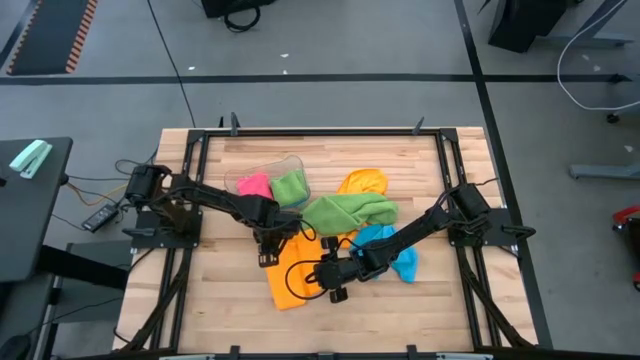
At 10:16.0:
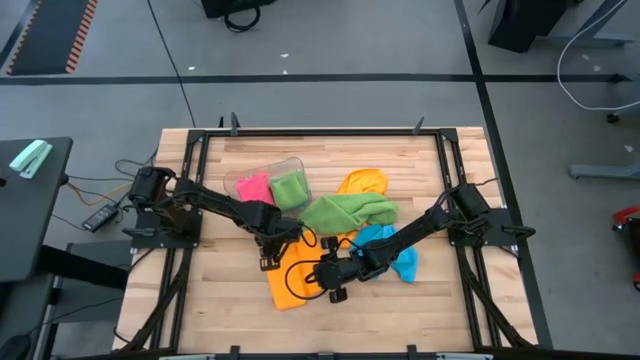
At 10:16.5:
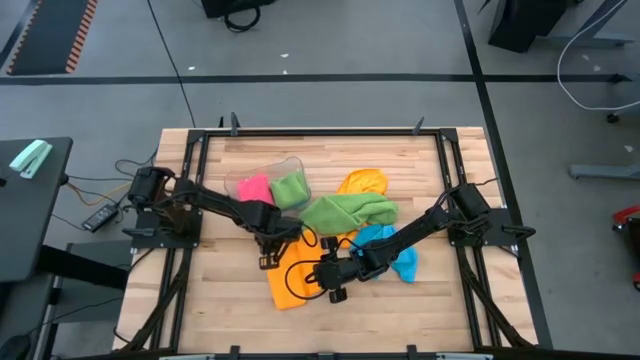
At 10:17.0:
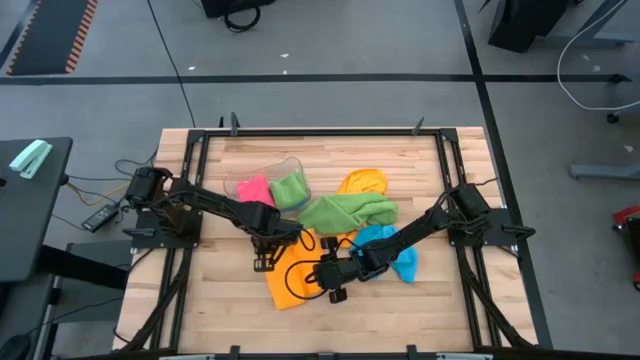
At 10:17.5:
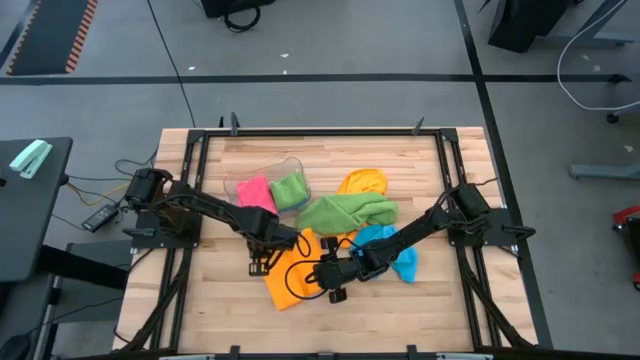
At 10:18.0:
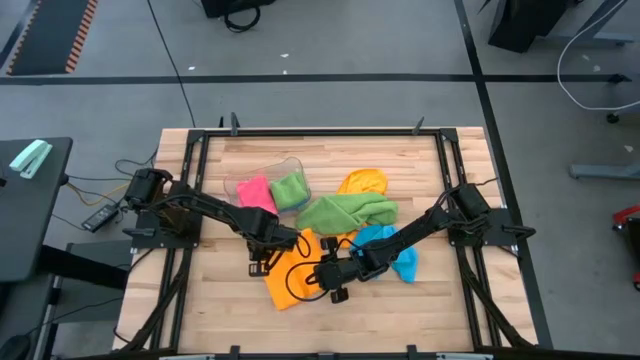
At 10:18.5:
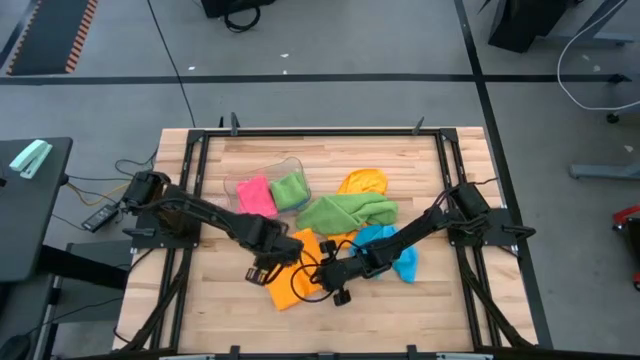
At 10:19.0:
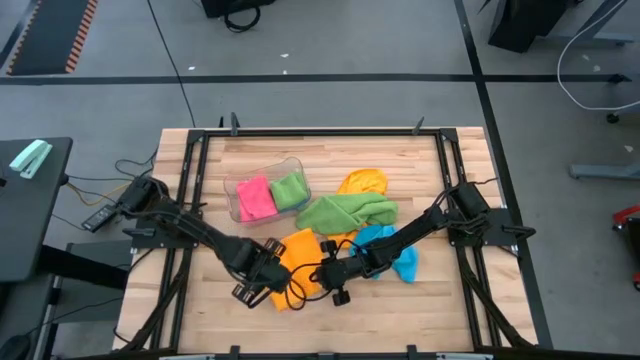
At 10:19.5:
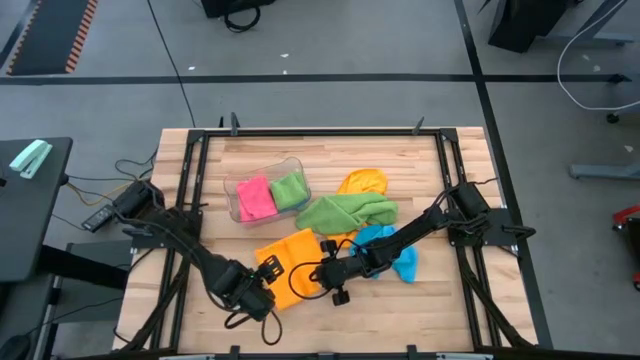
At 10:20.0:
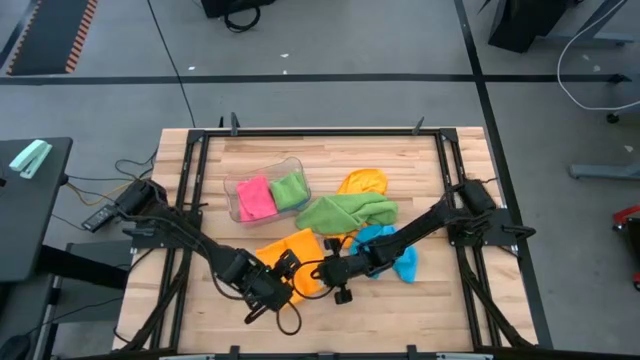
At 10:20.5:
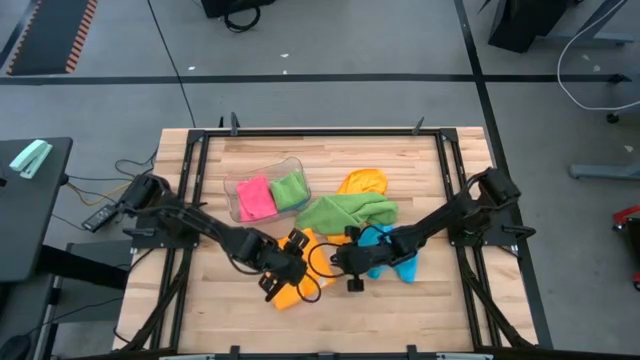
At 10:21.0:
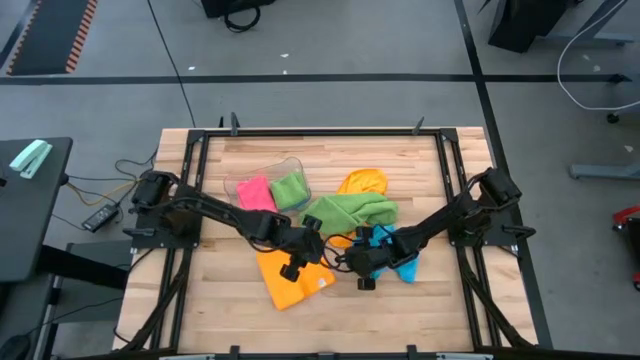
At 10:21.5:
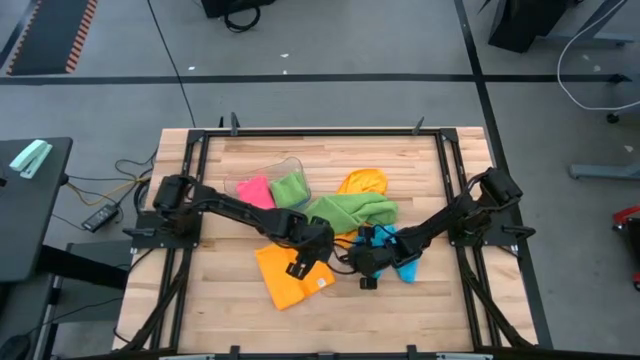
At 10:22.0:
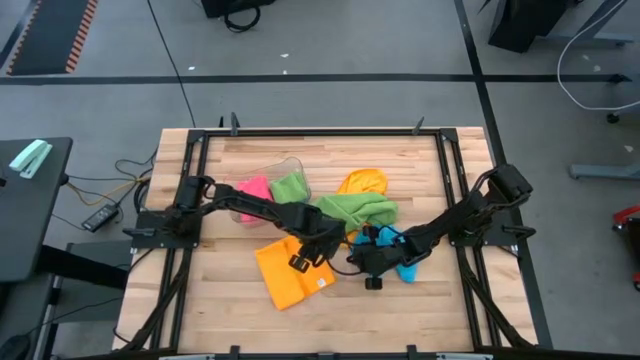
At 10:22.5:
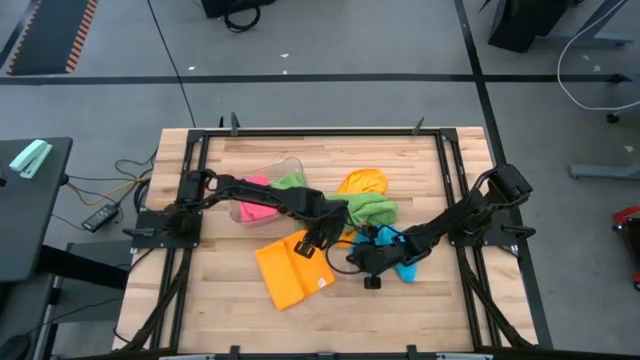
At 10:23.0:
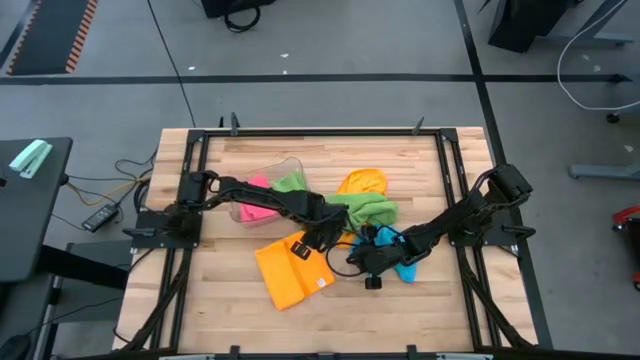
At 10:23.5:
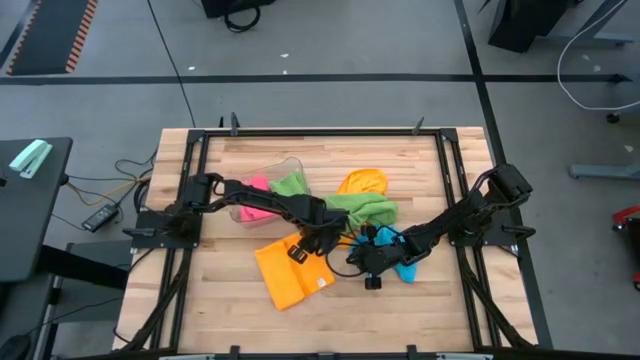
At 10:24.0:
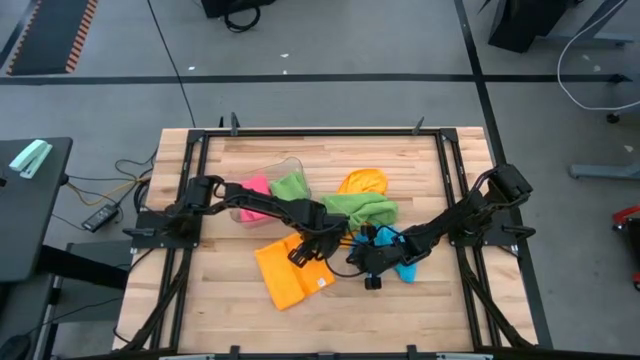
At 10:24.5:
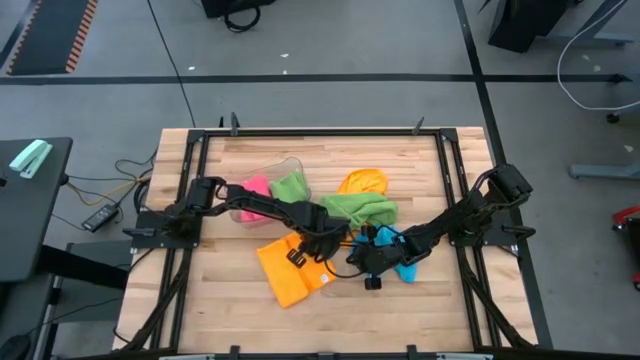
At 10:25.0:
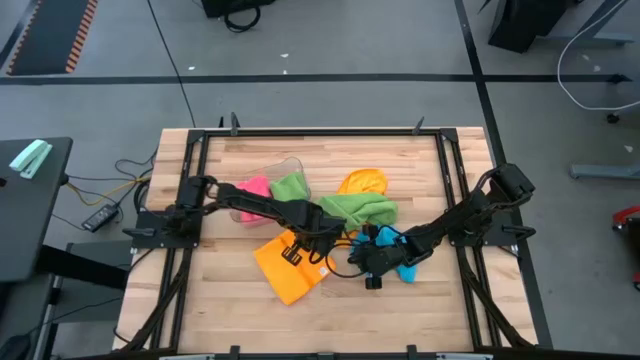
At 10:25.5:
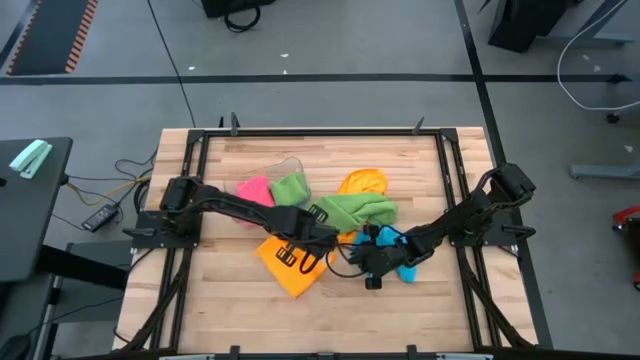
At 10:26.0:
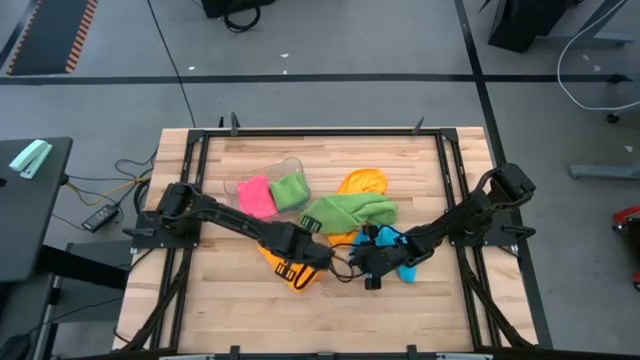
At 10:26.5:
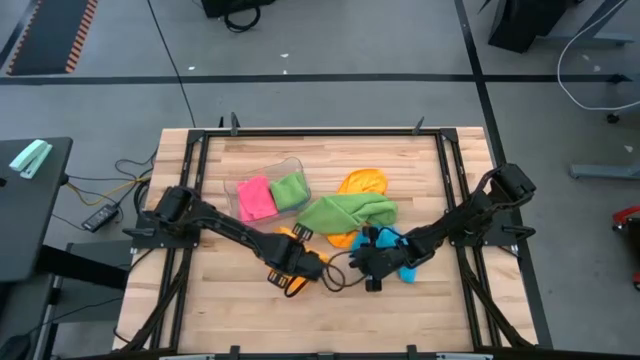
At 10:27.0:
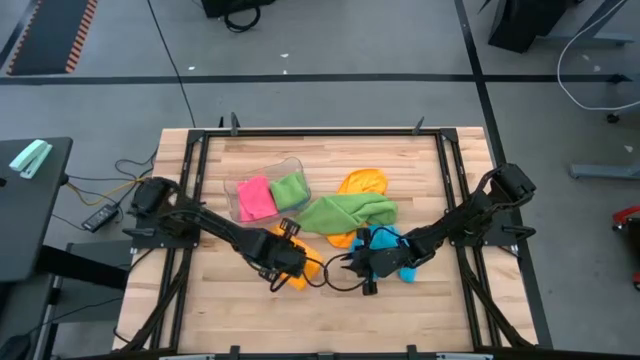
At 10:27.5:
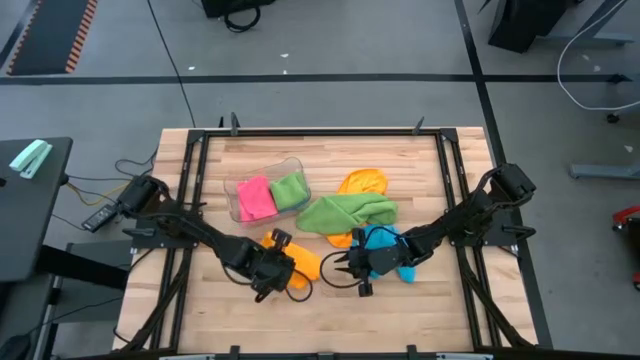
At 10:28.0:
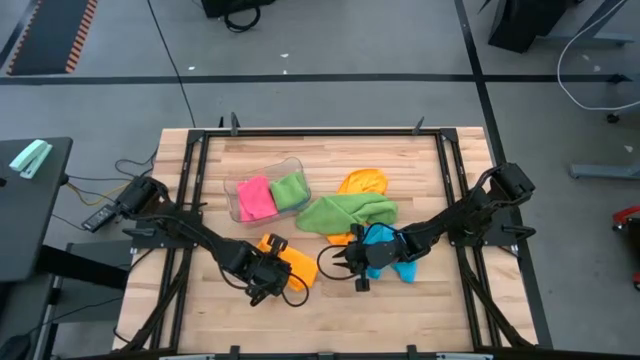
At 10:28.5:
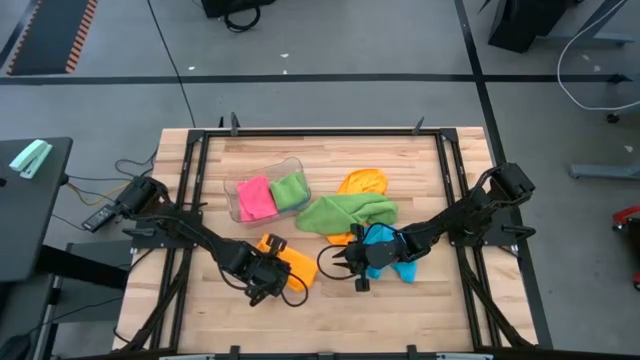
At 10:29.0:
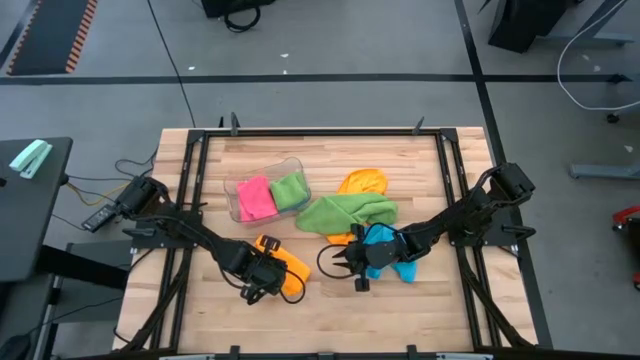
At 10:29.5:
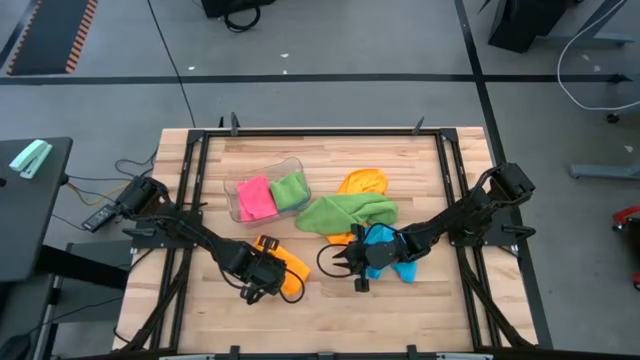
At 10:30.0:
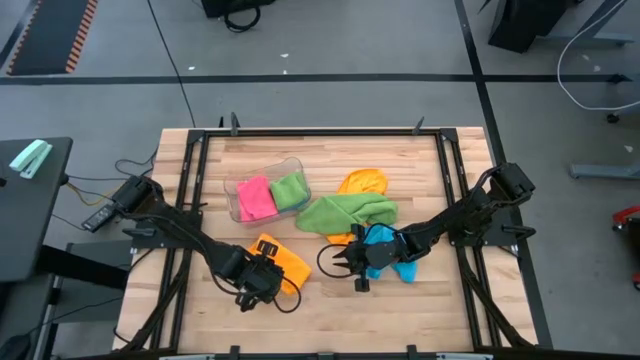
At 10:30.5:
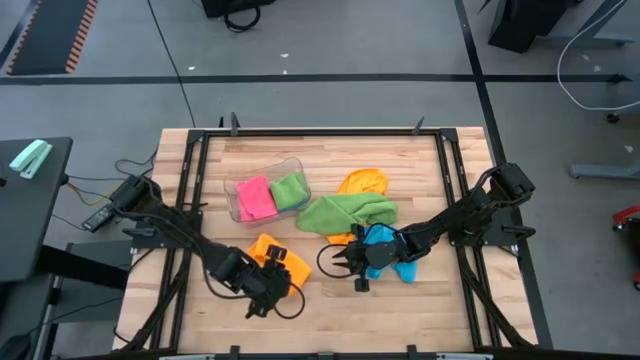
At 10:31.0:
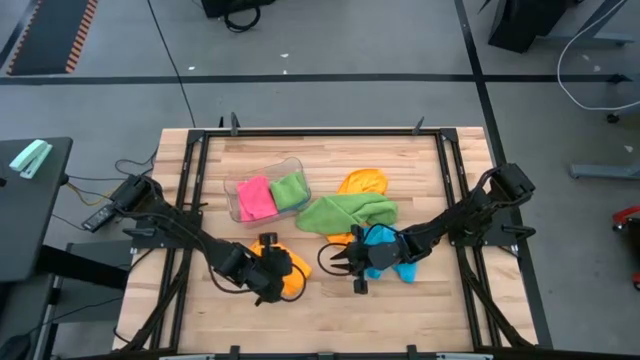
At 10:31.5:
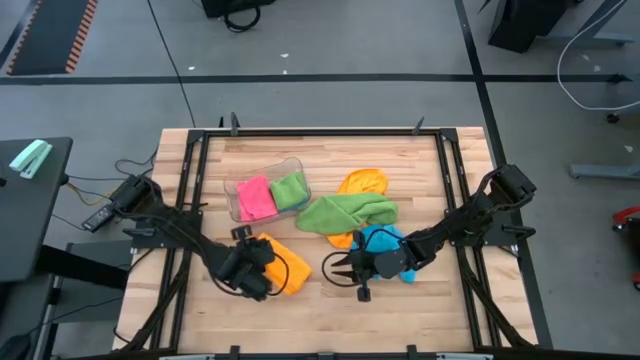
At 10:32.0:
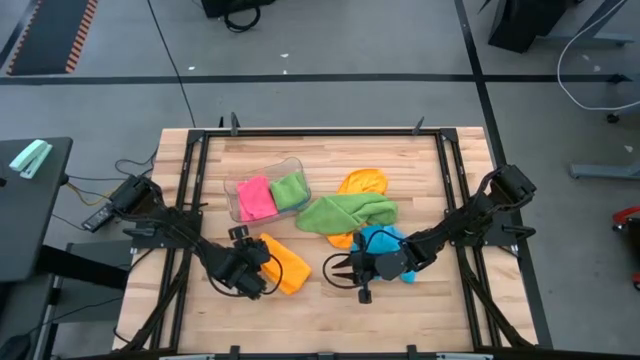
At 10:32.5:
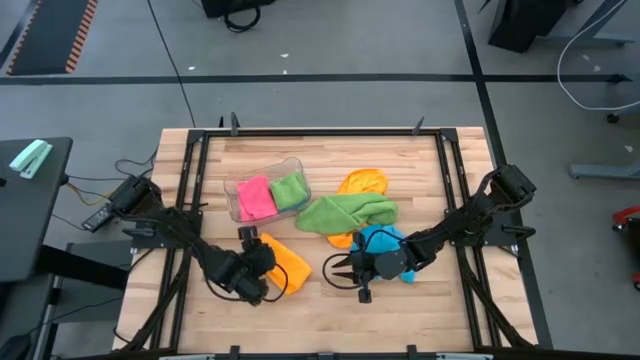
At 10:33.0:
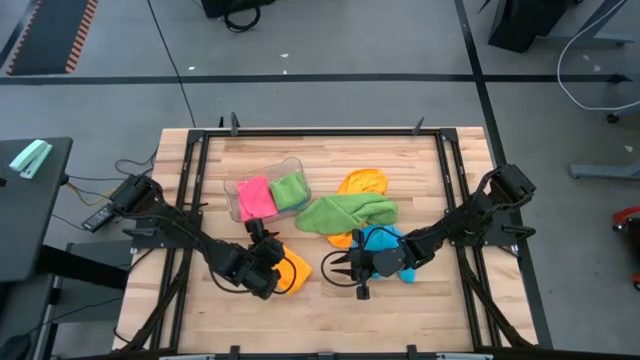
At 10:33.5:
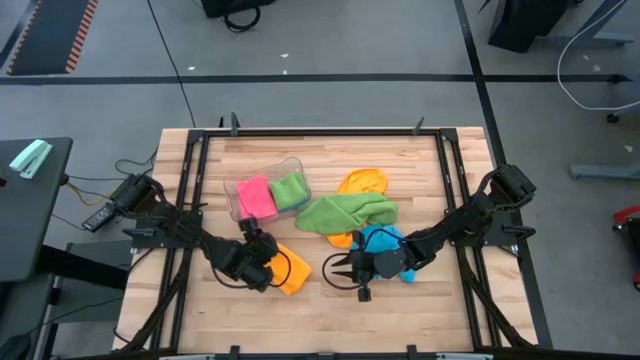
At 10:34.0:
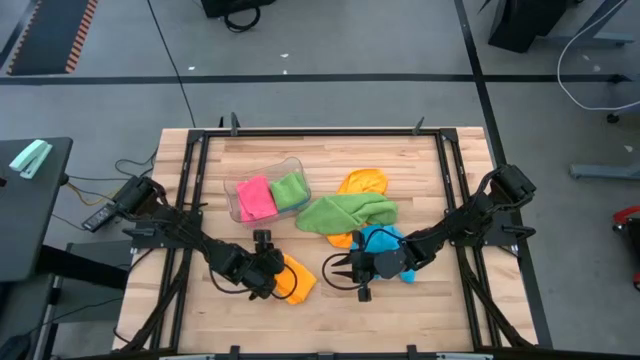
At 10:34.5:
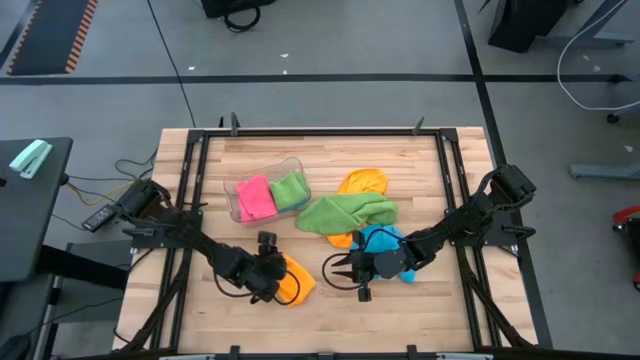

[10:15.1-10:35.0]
Task: Fold microfiber towels
Fold the bottom yellow microfiber towel
